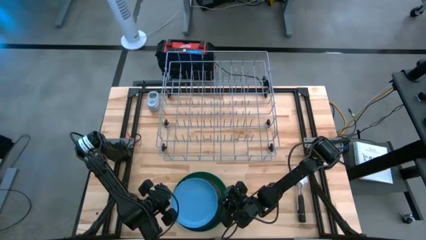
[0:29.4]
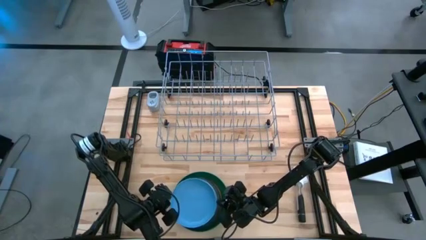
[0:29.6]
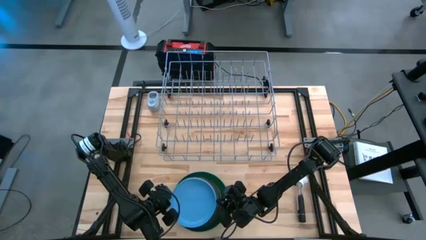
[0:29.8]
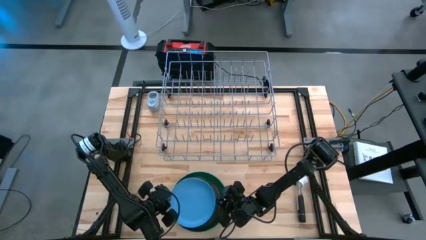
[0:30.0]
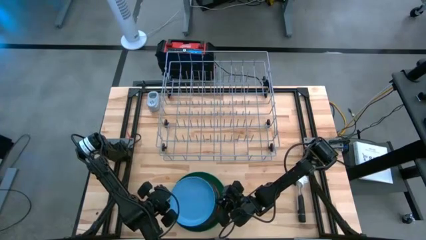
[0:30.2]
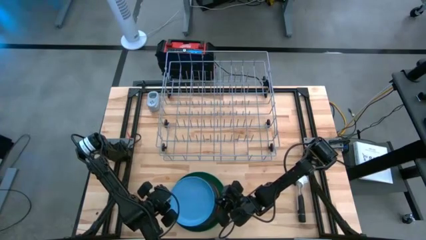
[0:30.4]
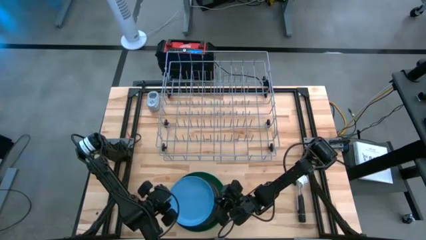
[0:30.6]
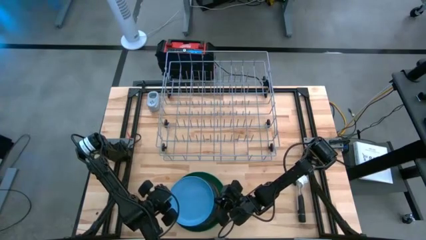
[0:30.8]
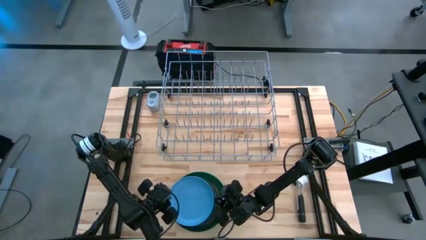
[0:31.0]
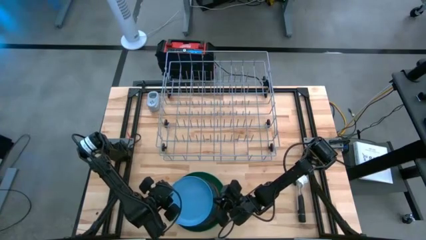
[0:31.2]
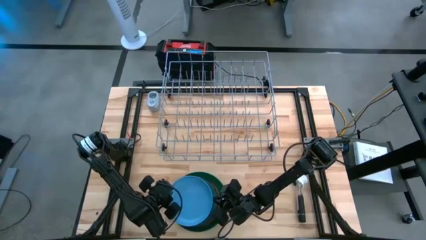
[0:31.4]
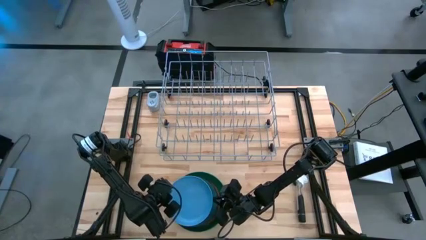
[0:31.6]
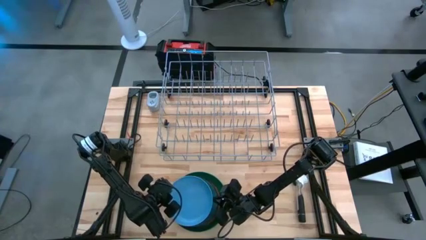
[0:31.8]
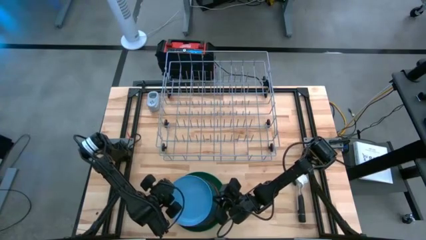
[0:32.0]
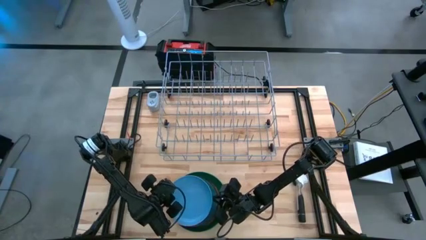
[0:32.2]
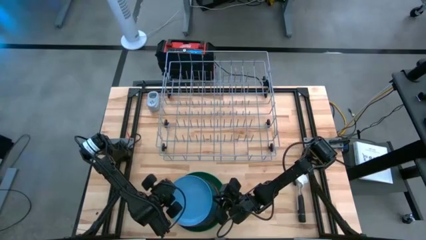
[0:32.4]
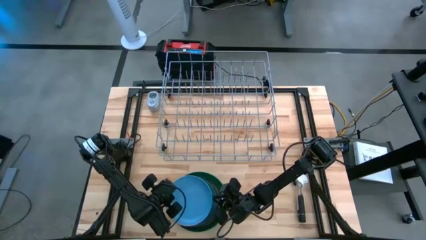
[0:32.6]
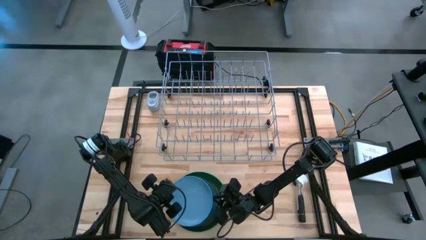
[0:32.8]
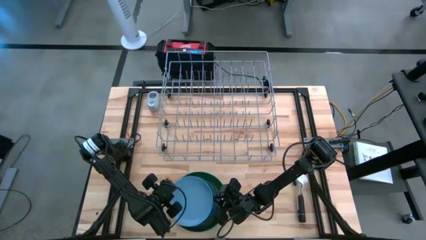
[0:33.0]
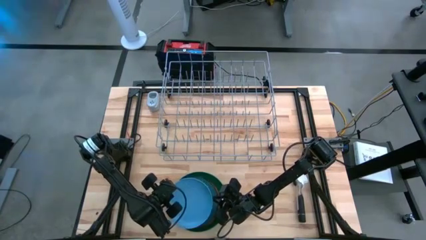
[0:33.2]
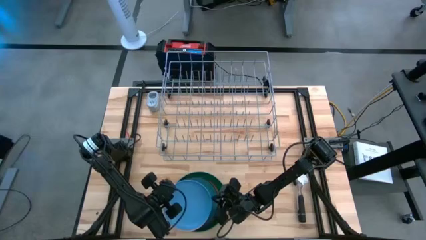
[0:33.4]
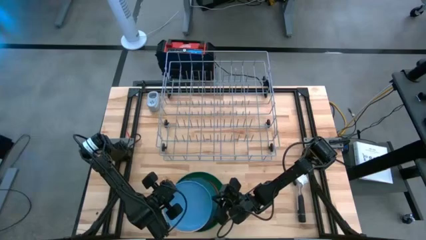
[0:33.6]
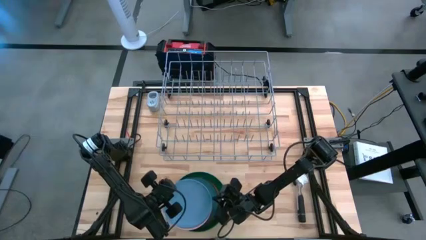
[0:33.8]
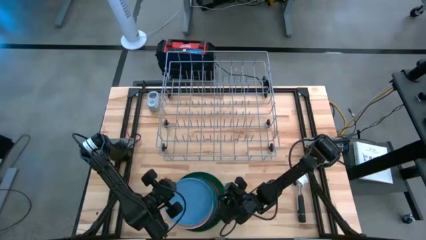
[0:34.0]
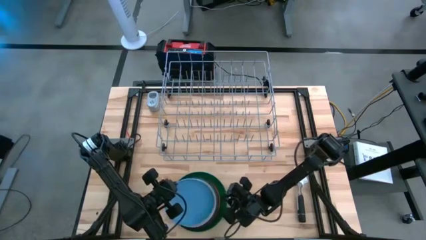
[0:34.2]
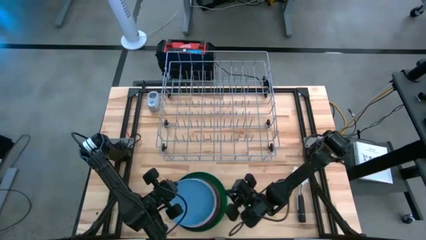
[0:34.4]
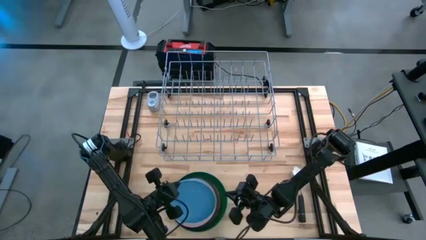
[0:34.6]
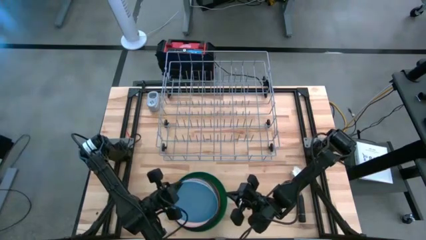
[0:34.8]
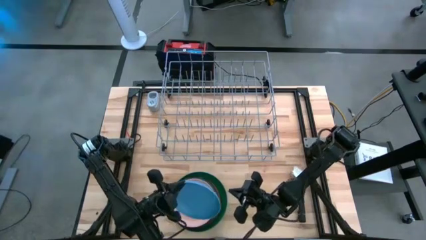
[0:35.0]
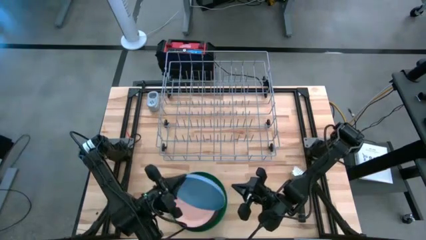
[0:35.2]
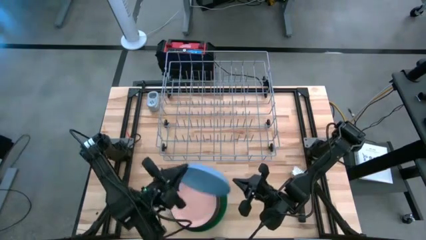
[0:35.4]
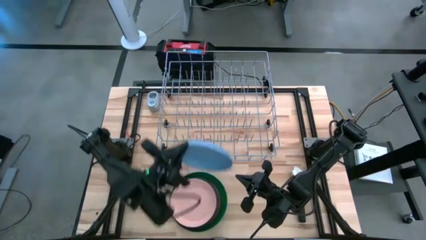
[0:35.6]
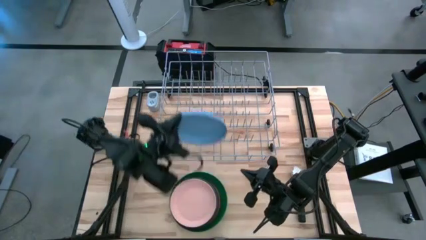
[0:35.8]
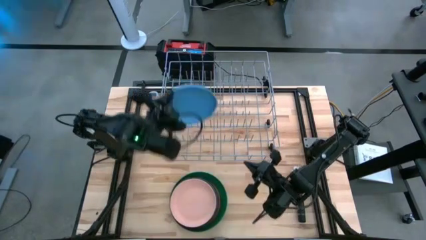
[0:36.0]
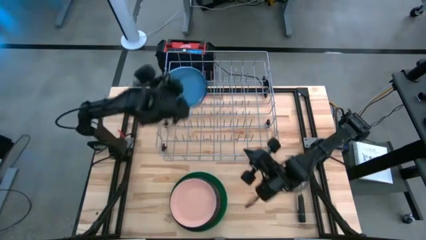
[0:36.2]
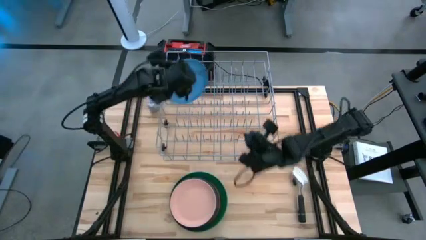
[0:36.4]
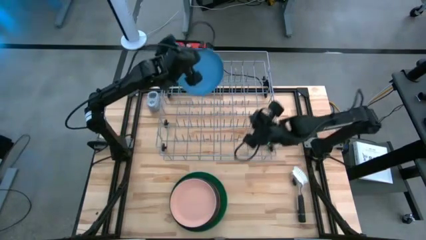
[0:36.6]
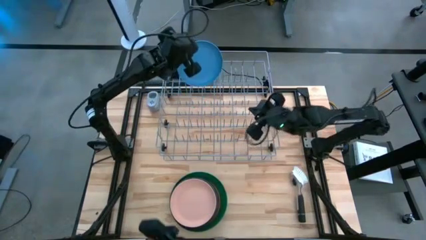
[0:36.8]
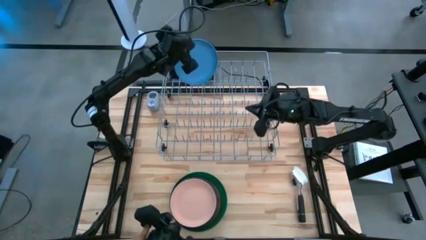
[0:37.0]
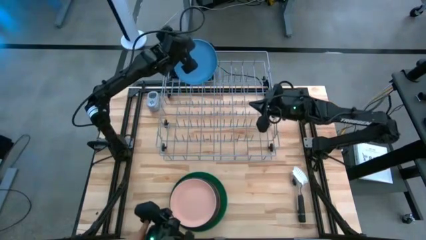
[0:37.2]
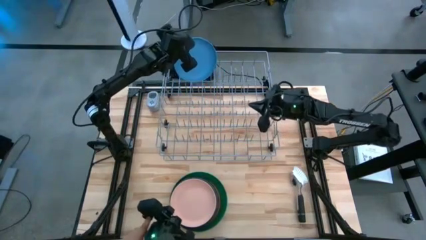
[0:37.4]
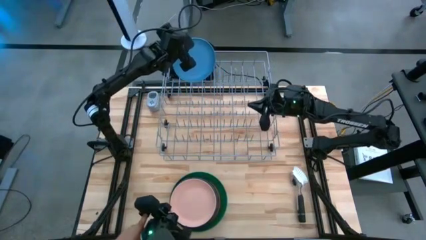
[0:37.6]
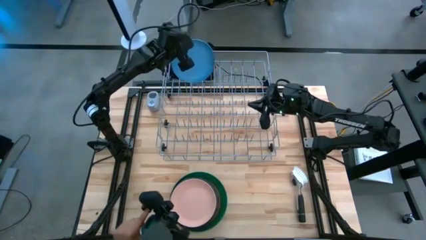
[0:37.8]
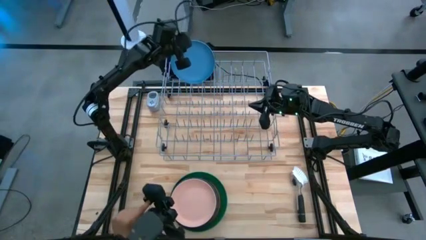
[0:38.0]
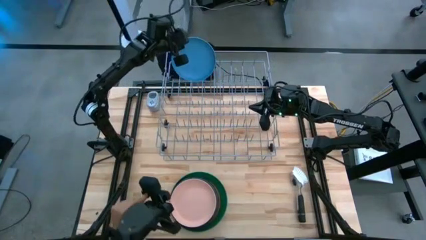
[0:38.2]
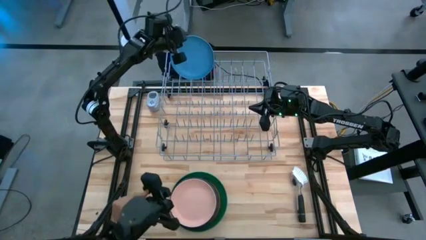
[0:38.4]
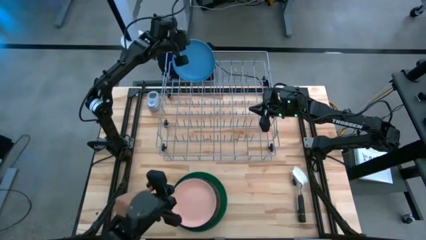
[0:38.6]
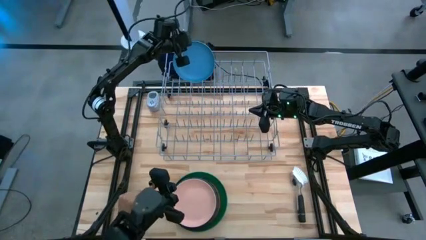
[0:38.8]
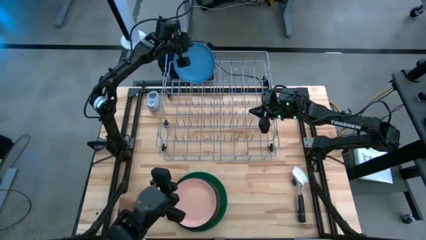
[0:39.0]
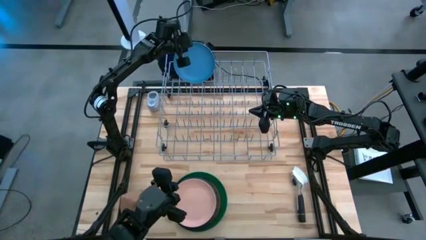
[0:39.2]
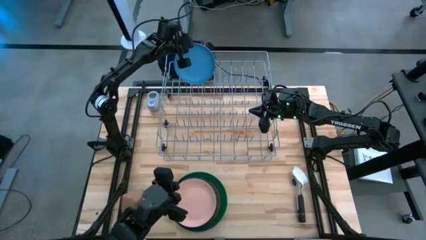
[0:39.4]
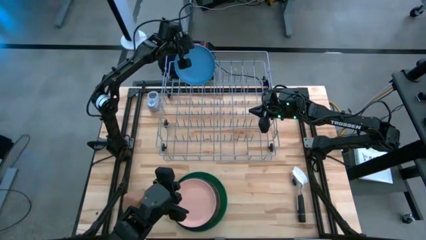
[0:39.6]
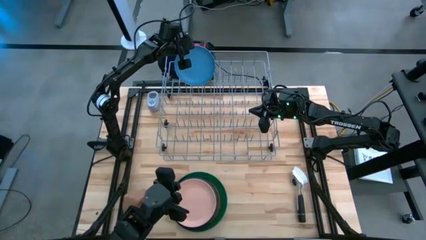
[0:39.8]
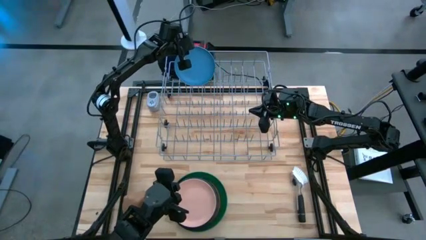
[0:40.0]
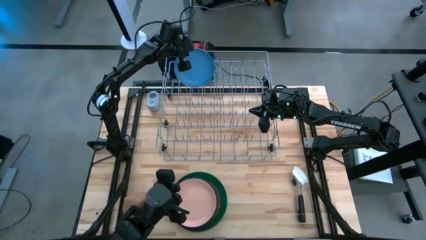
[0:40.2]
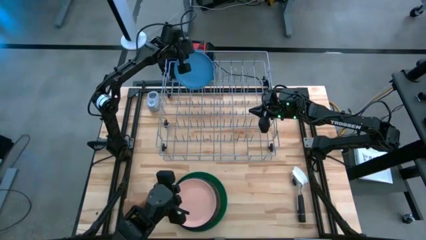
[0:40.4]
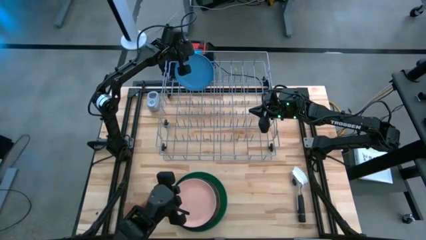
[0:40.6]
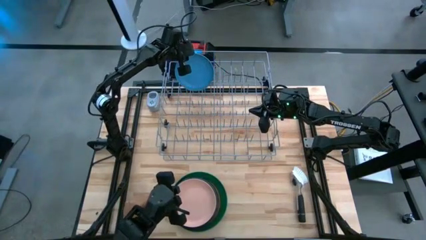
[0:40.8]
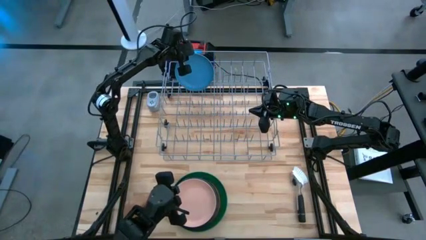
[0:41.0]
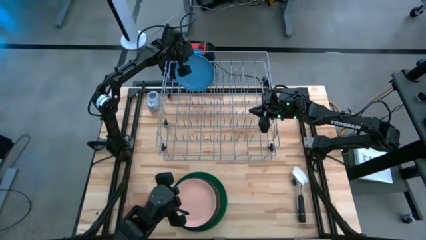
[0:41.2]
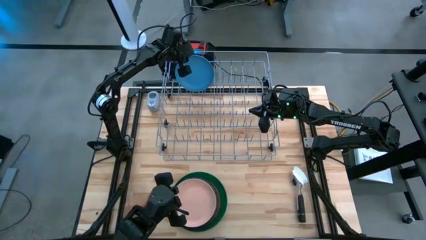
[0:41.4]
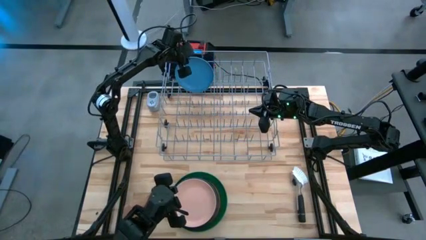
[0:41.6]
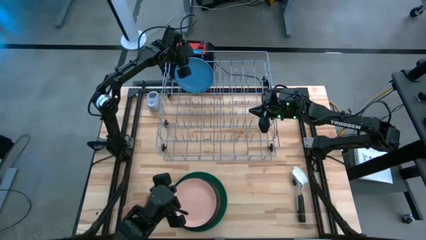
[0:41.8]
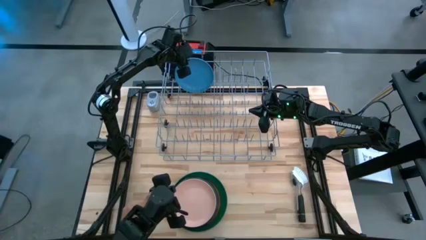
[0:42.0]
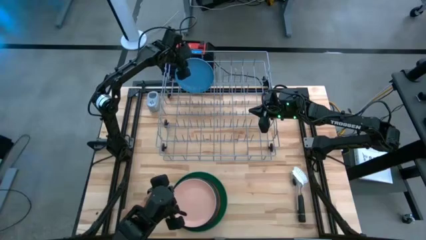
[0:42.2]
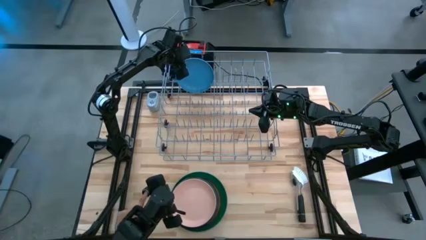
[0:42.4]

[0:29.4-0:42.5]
Task: Sort dishes
Put the blue plate into the dish rack

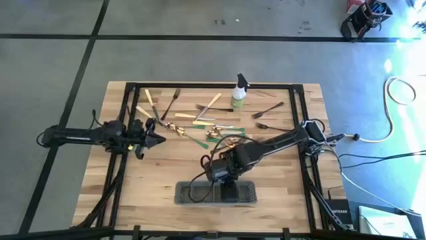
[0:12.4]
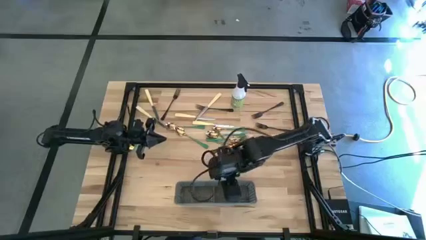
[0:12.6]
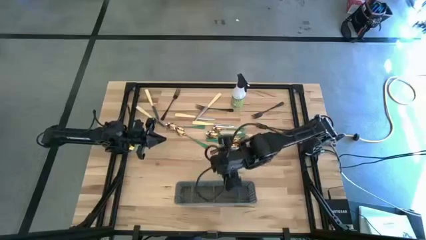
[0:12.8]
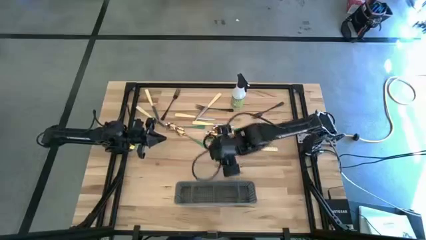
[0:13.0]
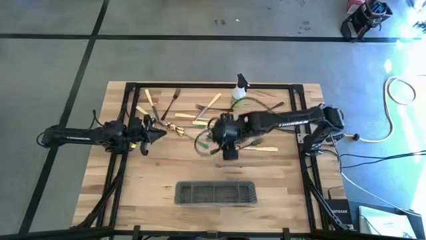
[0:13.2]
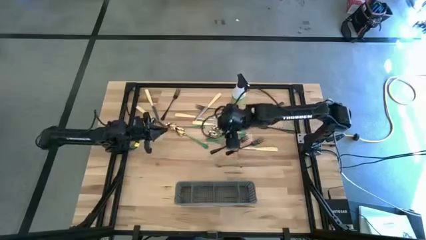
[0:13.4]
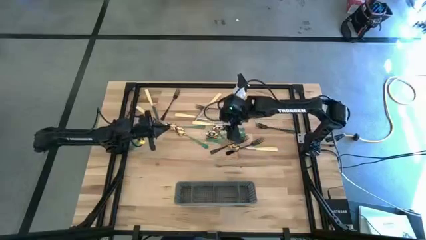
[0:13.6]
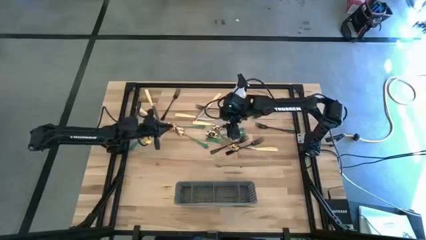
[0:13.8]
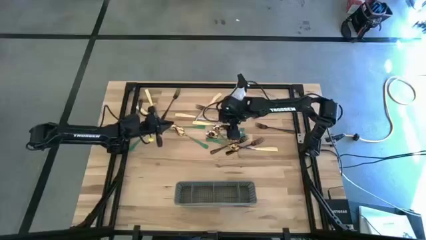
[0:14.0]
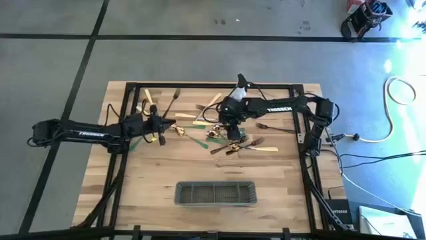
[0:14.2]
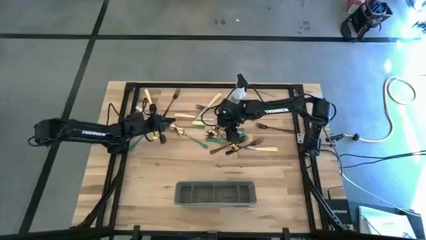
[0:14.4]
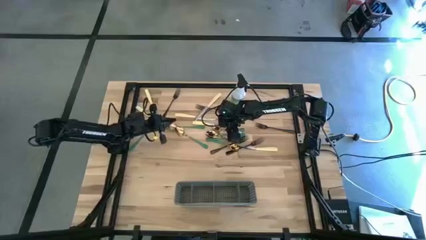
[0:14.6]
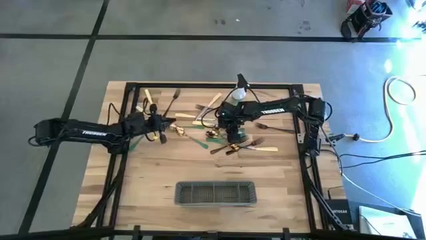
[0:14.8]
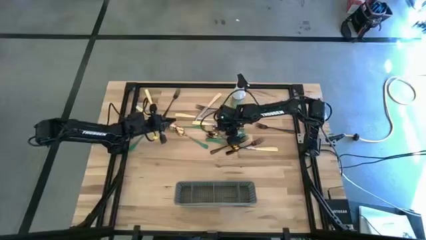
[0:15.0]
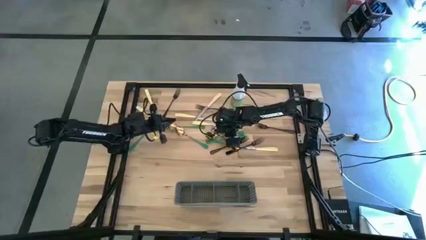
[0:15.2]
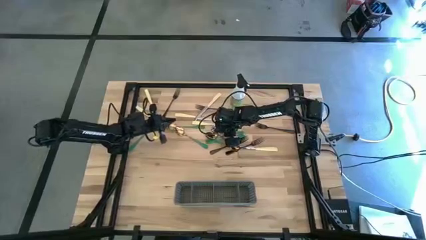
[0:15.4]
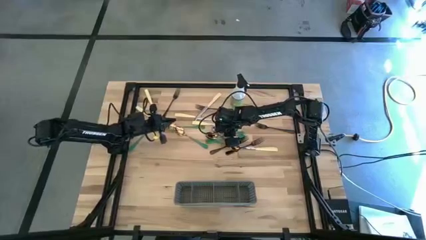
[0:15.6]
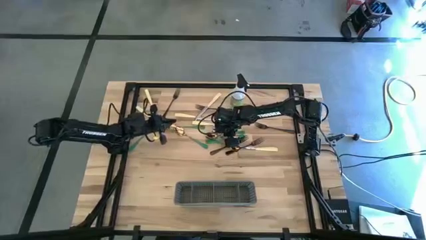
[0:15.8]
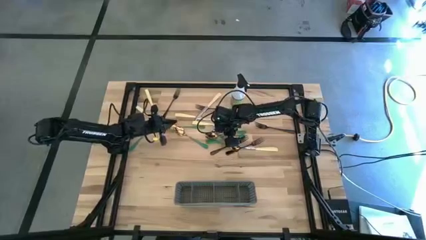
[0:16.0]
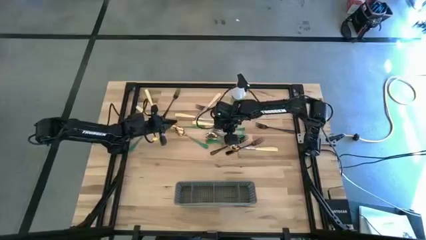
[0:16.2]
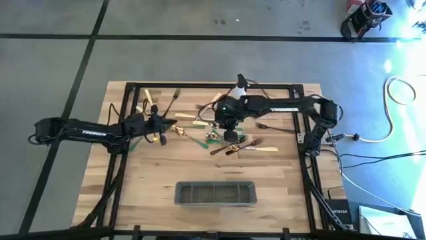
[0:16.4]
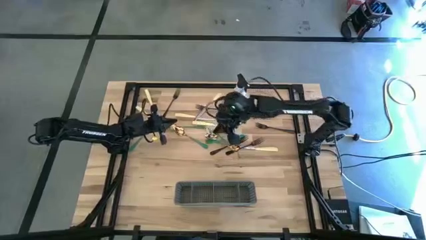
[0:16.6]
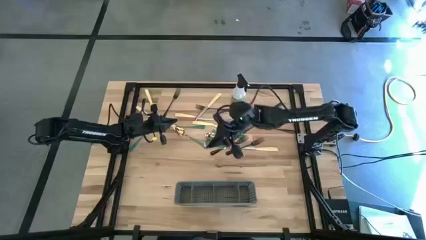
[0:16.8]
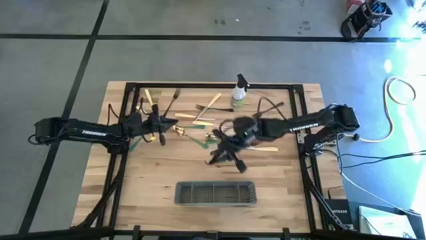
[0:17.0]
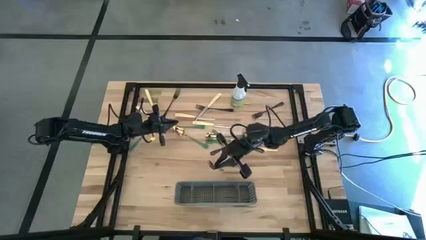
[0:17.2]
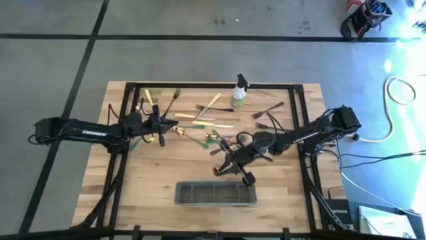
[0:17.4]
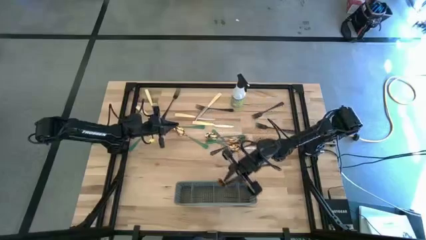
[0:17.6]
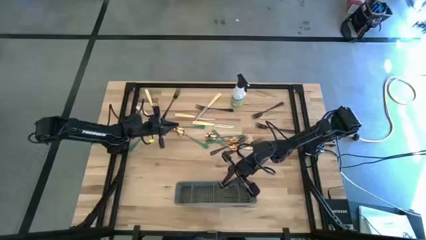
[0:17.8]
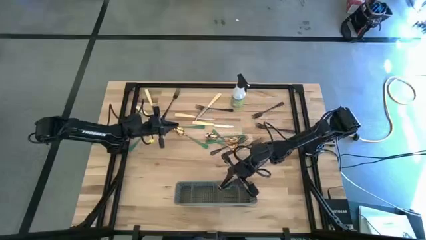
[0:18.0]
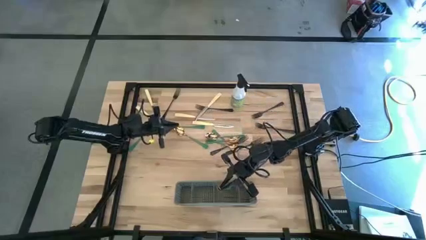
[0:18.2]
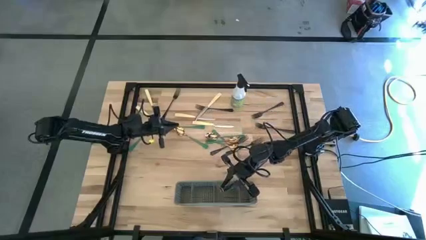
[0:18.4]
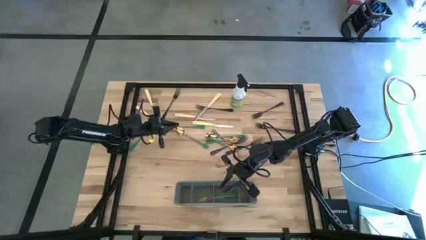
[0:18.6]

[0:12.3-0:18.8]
Task: Sort silverware
Put the middle top green spoon into the gray cutlery rack
